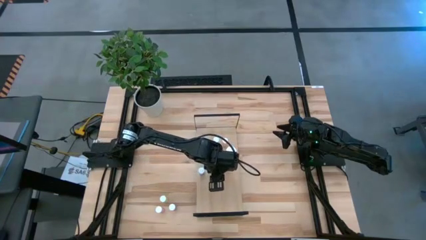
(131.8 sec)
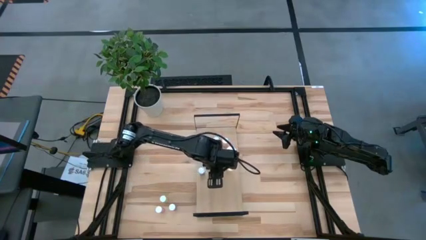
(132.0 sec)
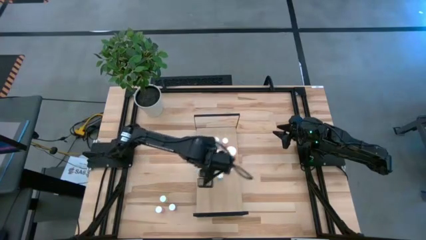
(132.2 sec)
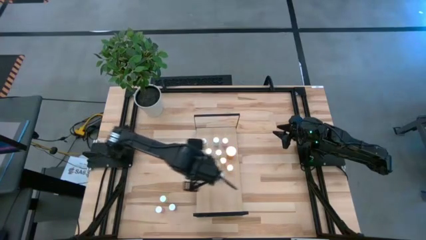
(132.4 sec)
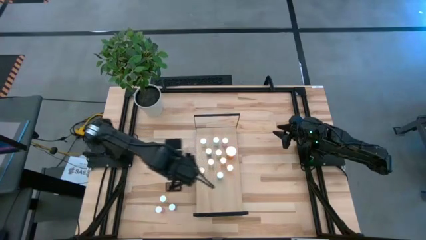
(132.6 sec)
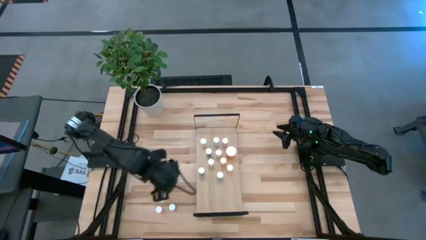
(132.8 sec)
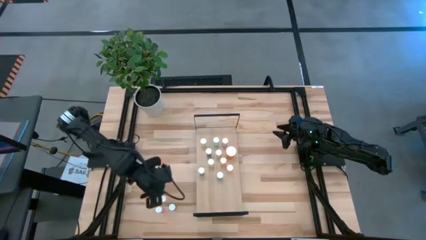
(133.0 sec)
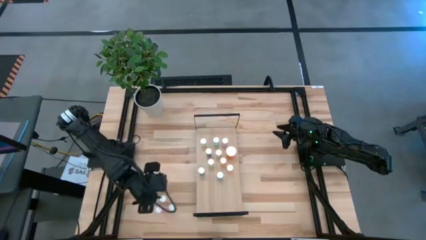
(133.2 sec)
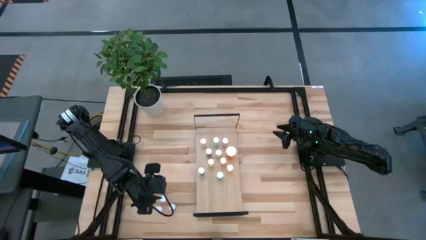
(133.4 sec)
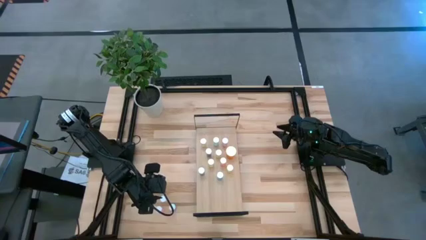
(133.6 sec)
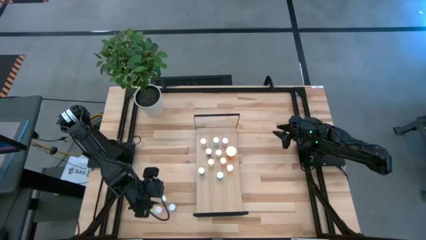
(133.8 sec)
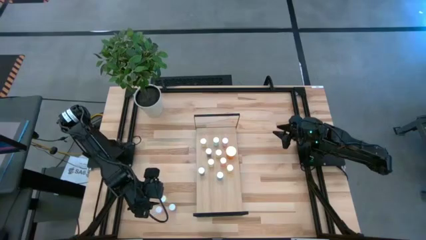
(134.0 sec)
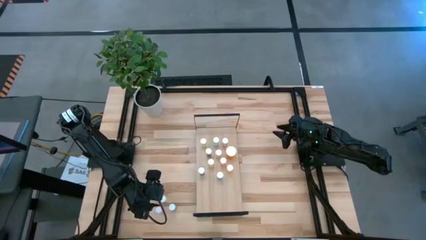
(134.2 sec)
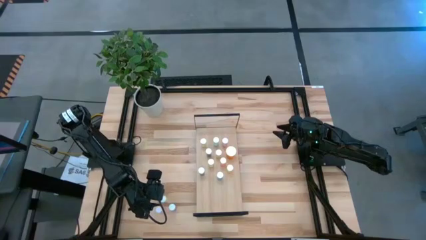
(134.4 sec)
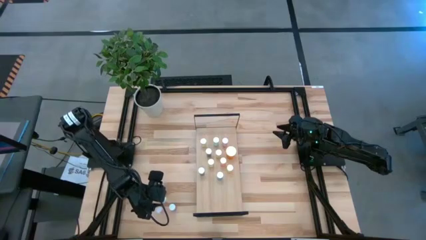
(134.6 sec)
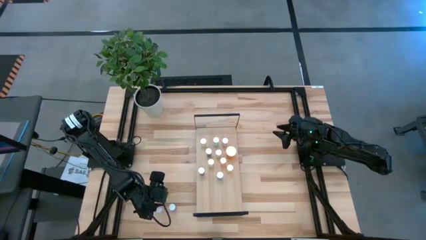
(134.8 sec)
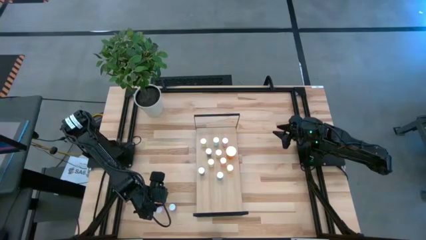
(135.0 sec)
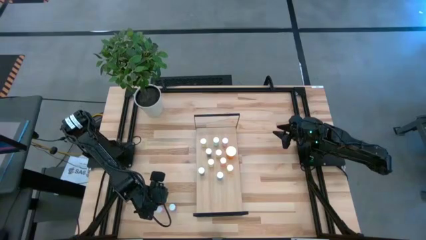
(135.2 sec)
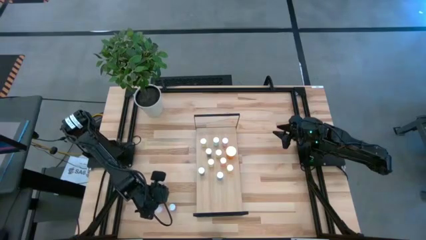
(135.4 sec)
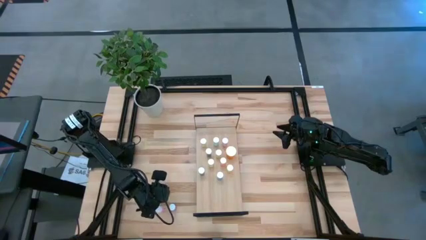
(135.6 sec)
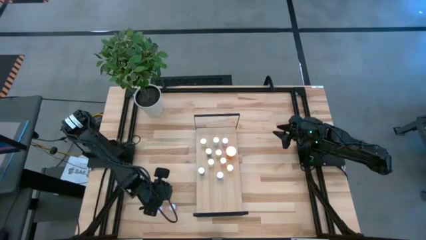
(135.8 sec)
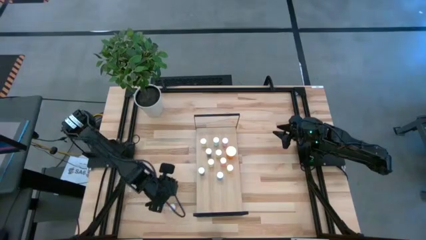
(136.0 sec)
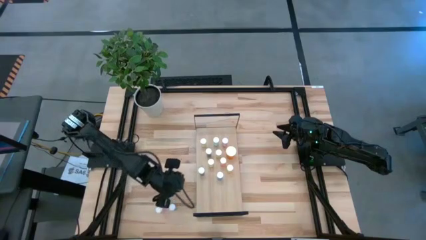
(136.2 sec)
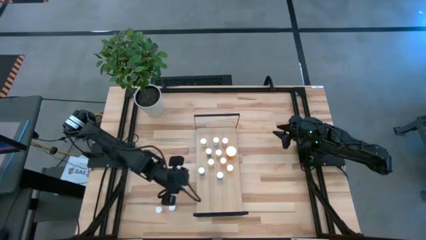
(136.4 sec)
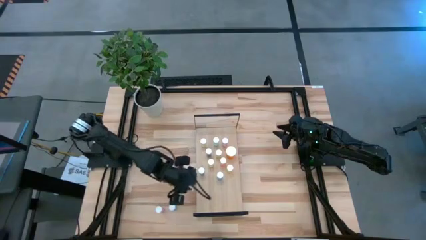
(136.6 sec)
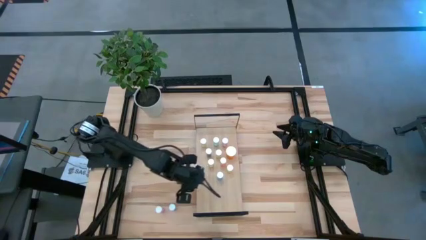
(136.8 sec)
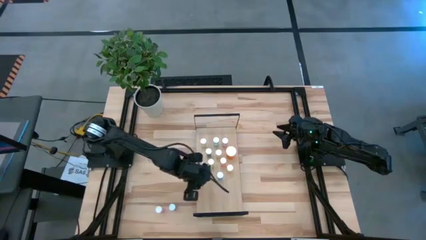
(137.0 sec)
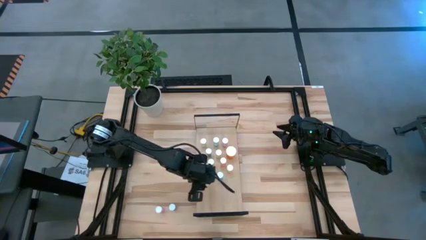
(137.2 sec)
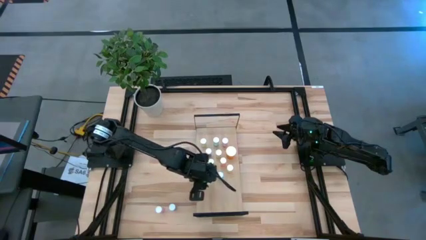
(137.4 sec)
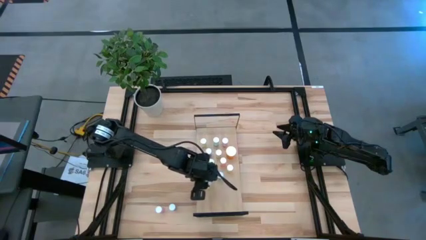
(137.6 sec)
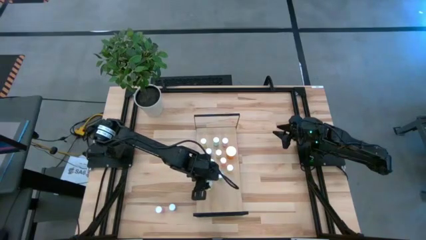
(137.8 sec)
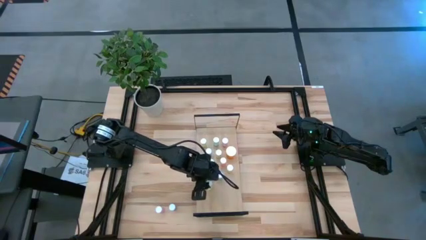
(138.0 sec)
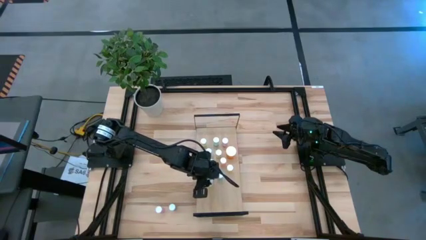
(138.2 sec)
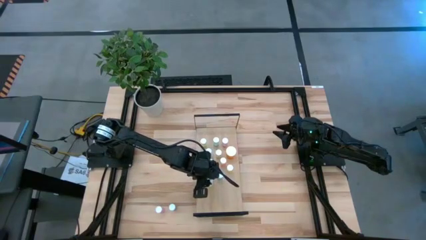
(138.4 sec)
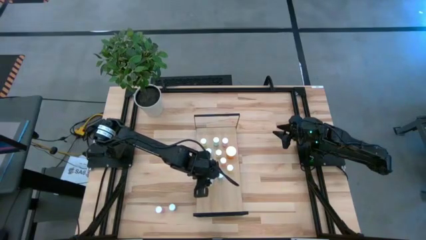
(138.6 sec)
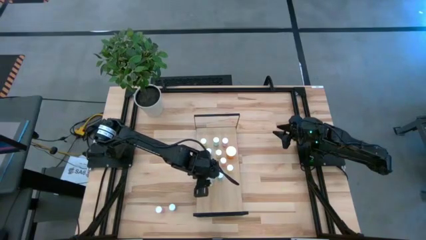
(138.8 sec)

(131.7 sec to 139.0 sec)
Task: Pick and place medicine bottles onto shelf by color
Put the yellow pill bottle on the shelf

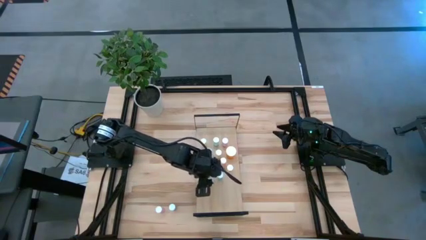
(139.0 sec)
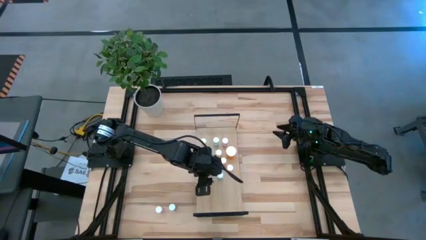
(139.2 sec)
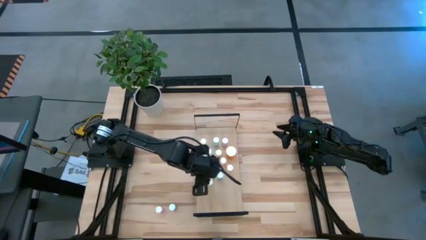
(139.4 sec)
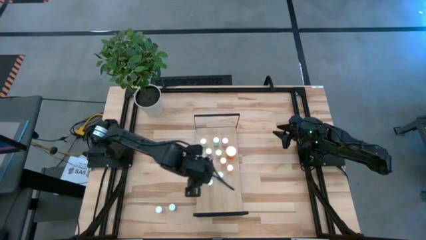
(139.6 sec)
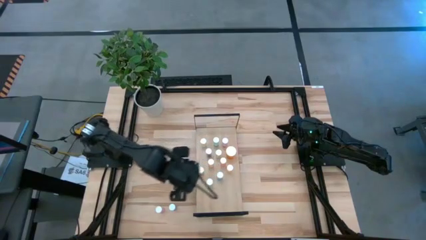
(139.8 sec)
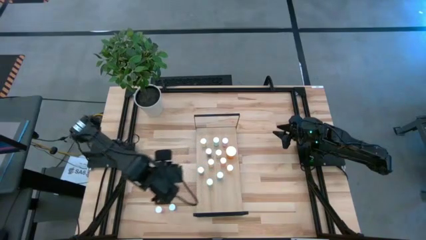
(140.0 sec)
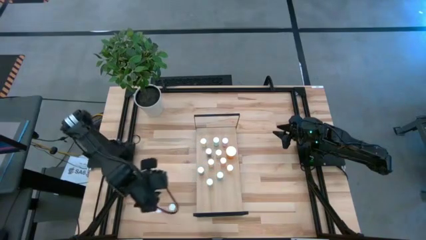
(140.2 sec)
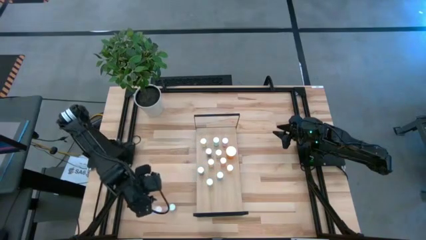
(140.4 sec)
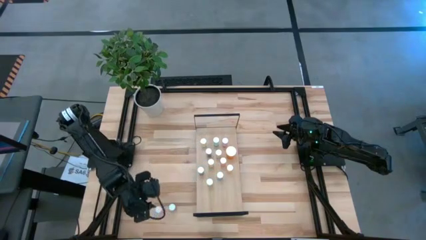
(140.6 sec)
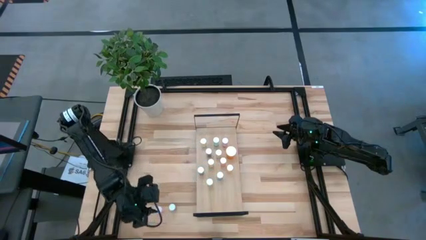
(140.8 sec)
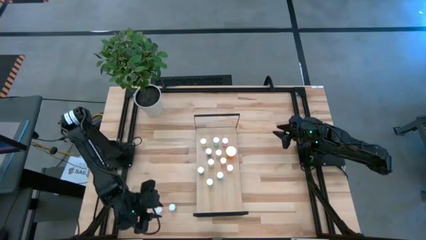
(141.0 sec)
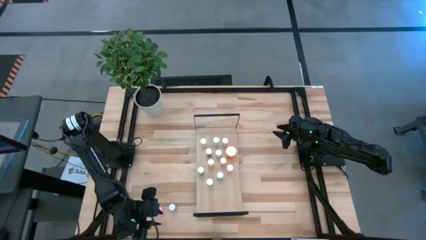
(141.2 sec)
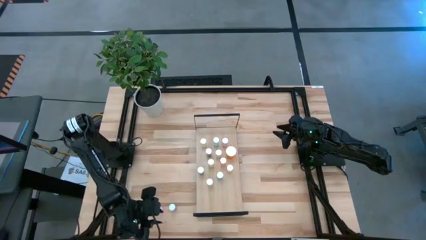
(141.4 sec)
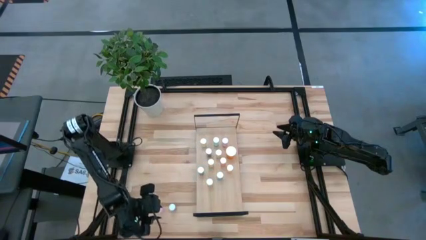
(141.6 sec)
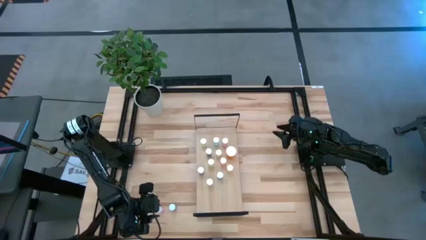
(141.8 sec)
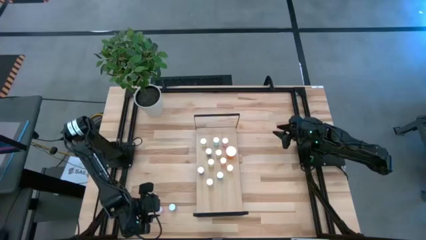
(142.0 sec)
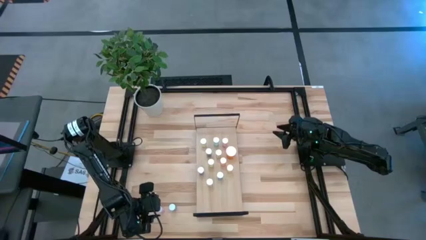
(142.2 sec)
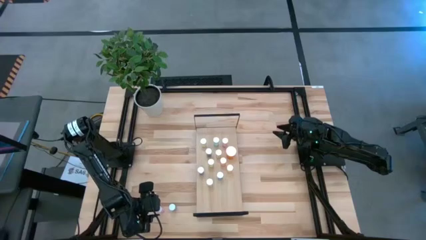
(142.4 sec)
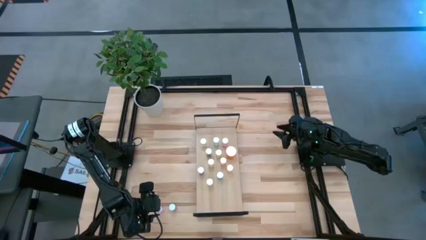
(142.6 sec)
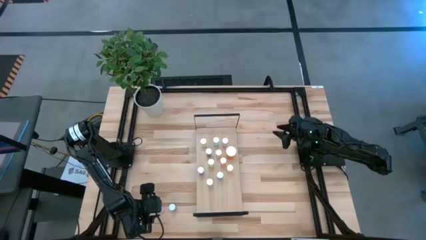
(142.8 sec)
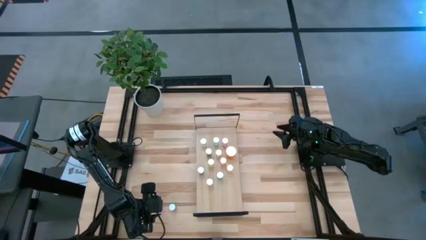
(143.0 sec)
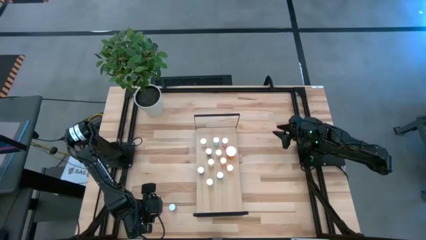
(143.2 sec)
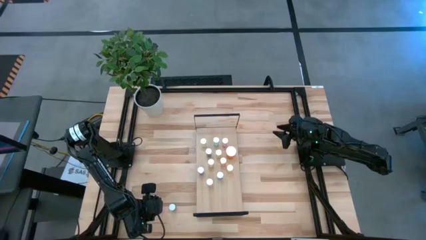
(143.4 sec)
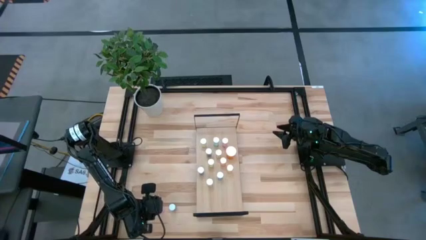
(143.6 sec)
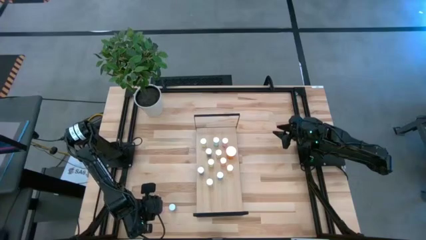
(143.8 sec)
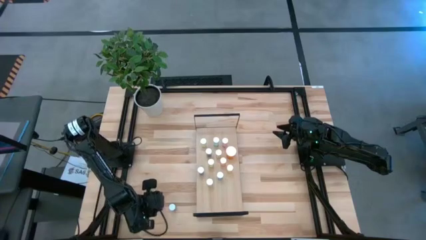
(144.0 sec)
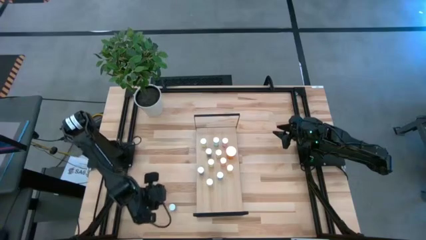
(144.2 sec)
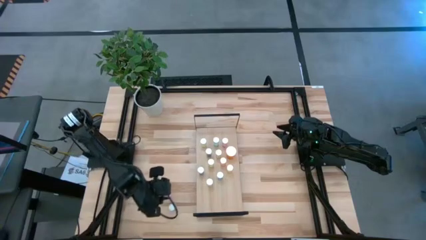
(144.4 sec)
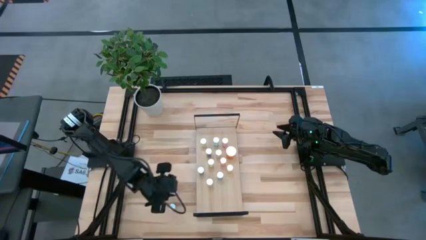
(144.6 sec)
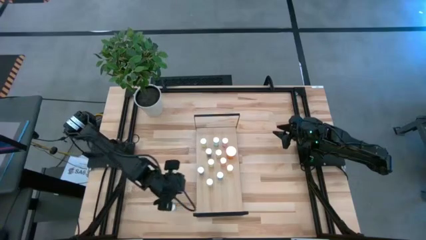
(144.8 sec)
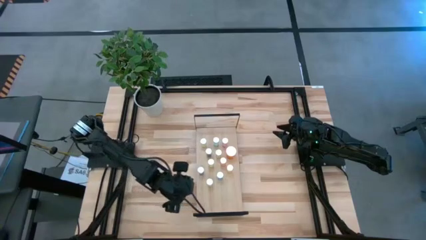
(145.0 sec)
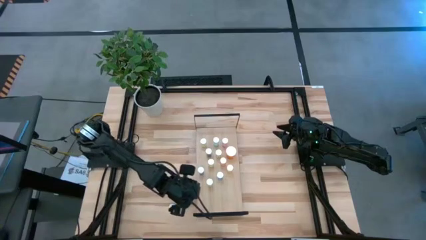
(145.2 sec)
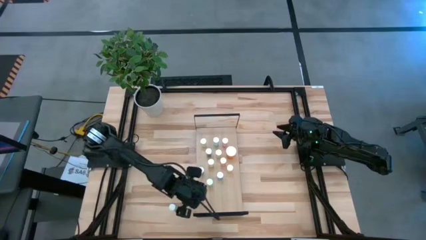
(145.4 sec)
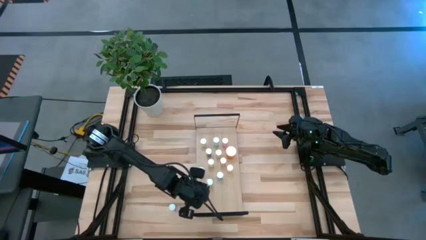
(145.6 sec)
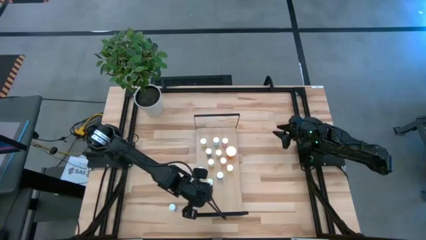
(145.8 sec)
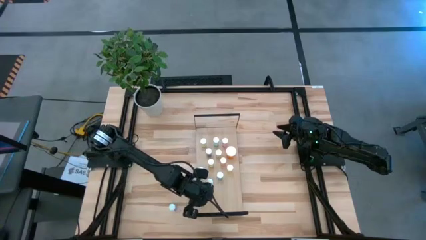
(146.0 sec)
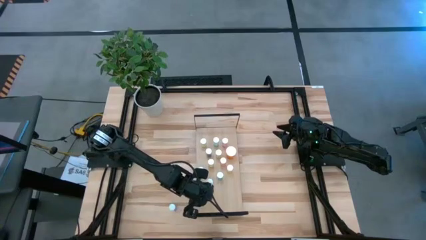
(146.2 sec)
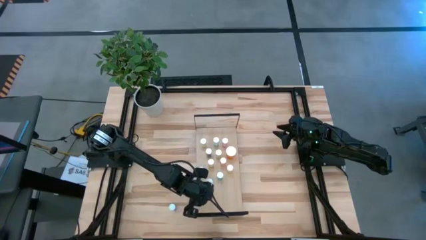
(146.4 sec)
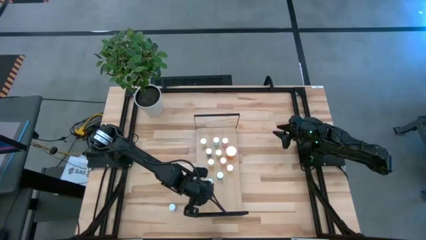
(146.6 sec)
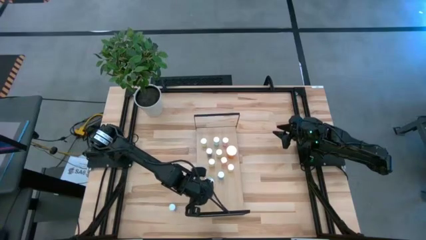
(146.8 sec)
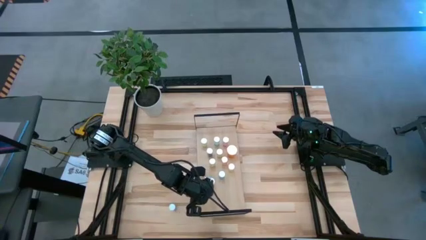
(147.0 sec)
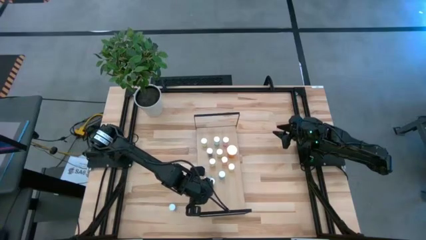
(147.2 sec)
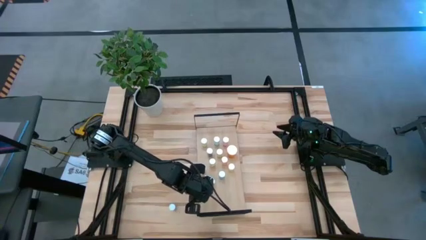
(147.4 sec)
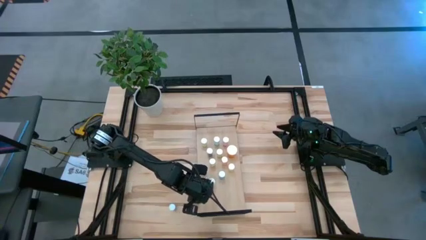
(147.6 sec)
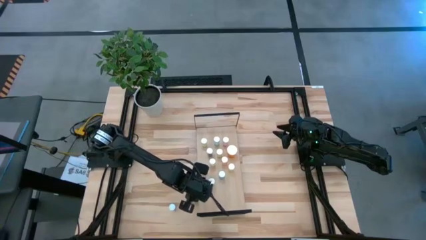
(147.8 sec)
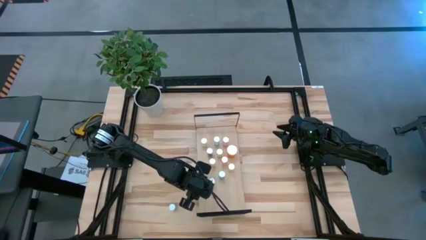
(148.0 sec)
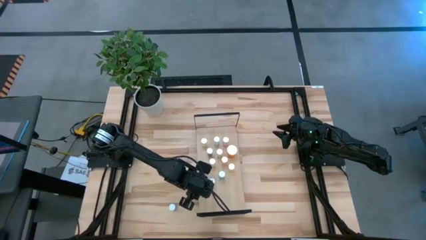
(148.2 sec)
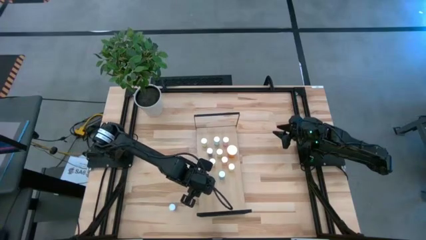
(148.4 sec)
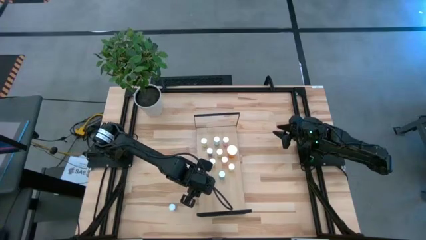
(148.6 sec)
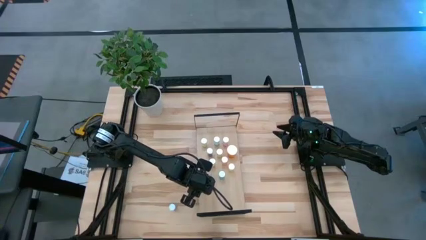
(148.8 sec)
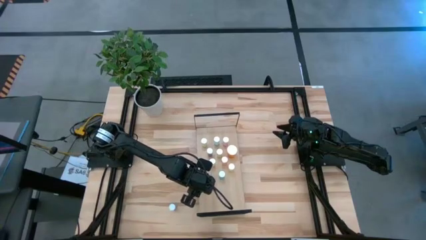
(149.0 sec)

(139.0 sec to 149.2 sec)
Put the pink pill bottle on the shelf
